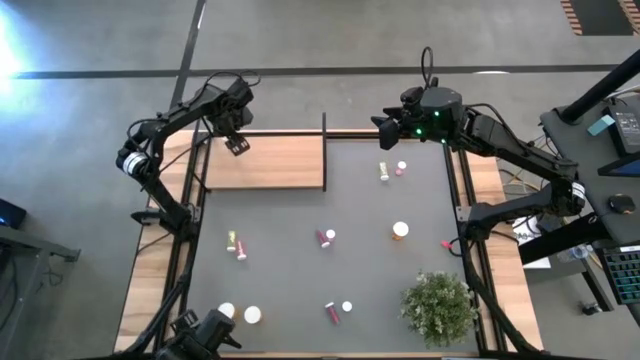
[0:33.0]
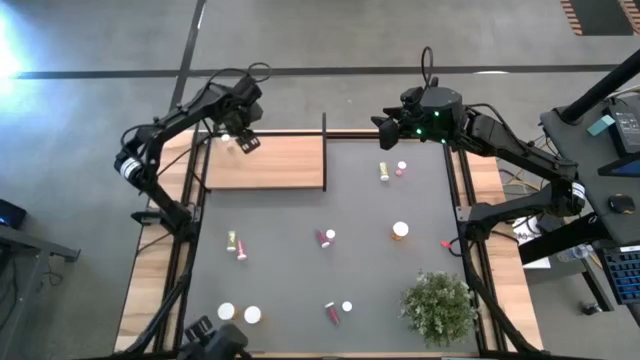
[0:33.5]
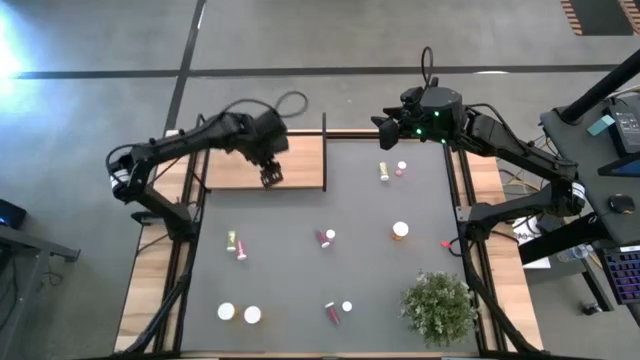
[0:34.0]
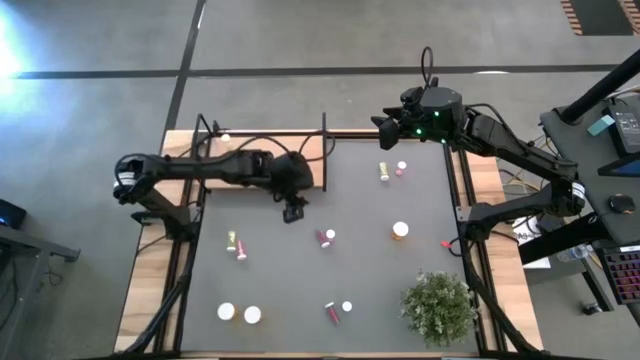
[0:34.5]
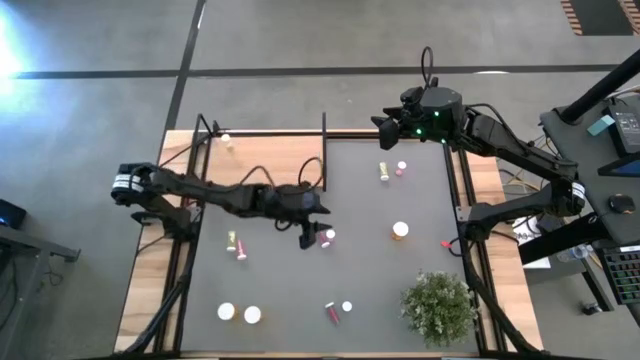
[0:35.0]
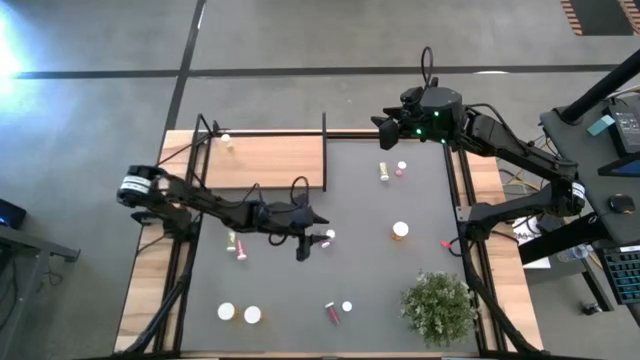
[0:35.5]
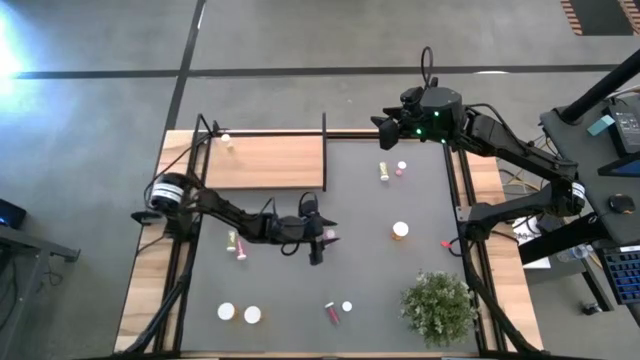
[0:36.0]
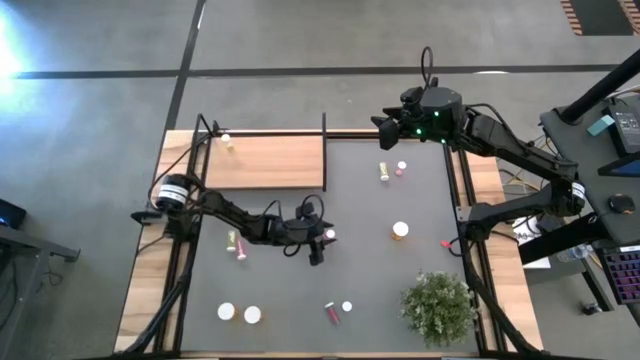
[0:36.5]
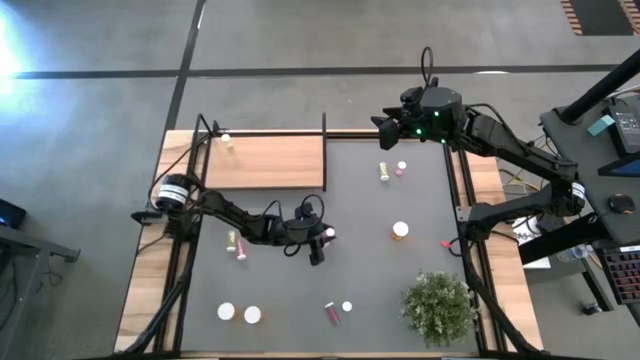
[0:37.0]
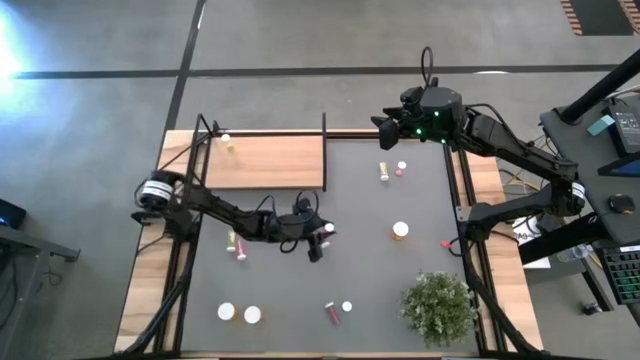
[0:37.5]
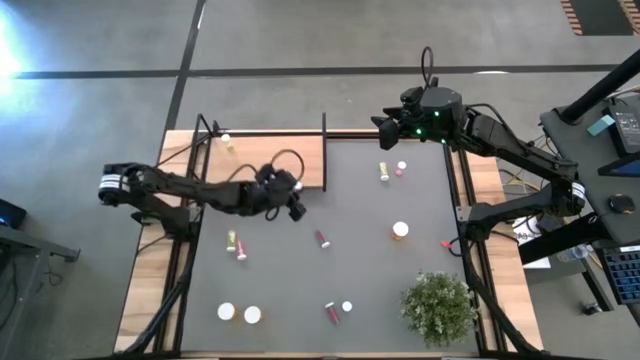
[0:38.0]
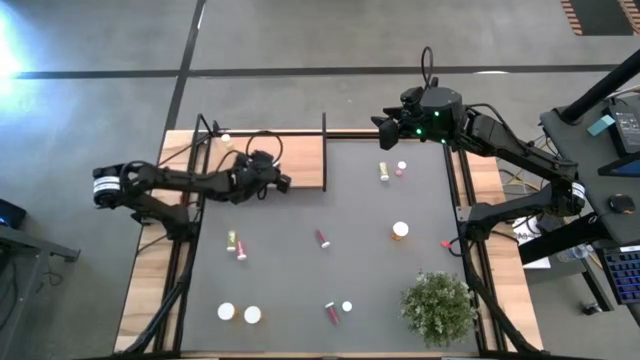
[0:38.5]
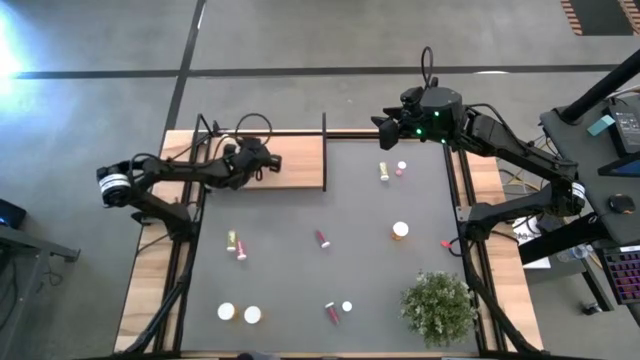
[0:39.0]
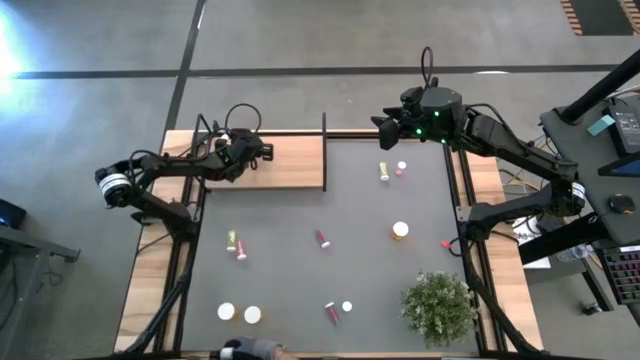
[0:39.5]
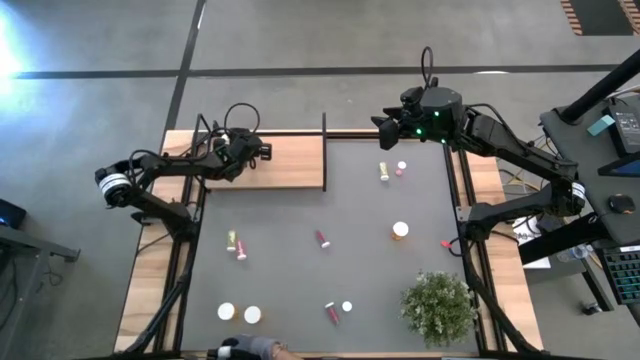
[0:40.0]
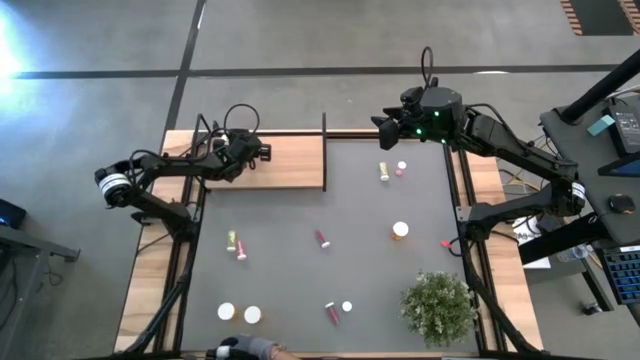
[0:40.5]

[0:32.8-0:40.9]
Task: Pick and place medicine bottles onto shelf by color
Put the middle pink pill bottle on the shelf

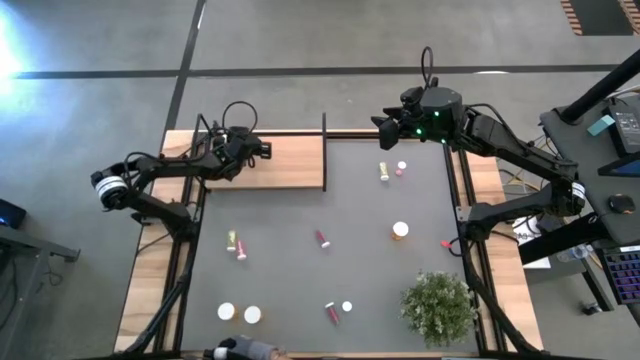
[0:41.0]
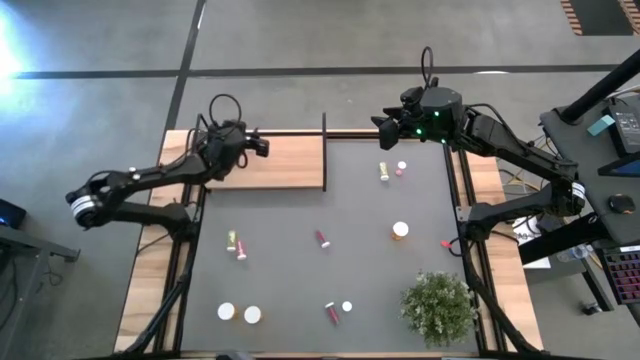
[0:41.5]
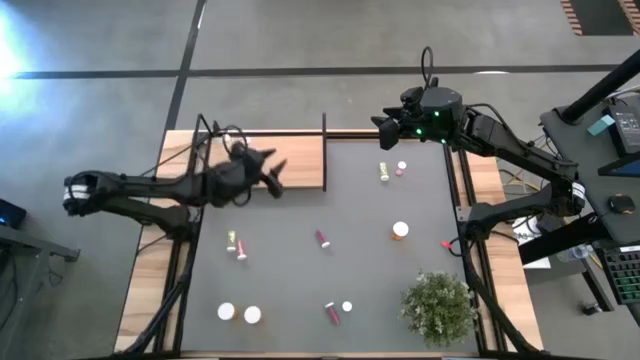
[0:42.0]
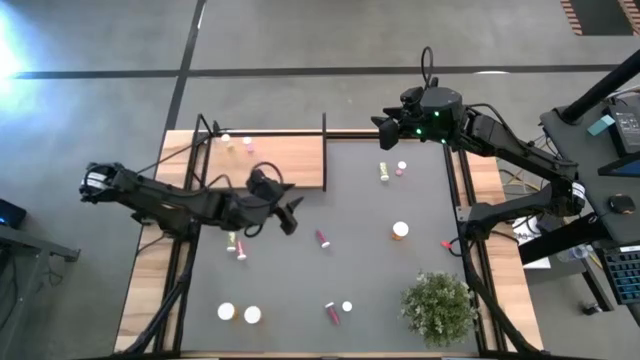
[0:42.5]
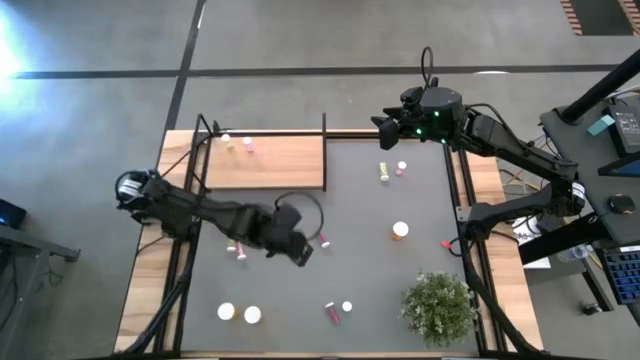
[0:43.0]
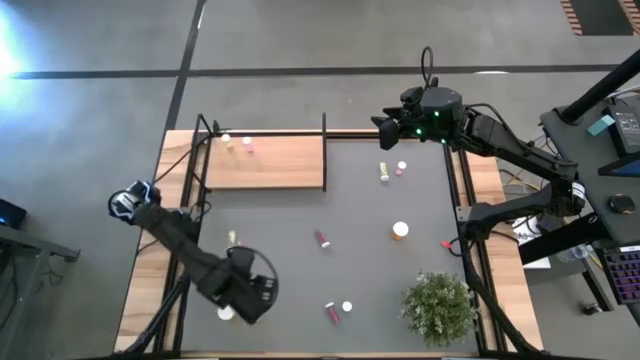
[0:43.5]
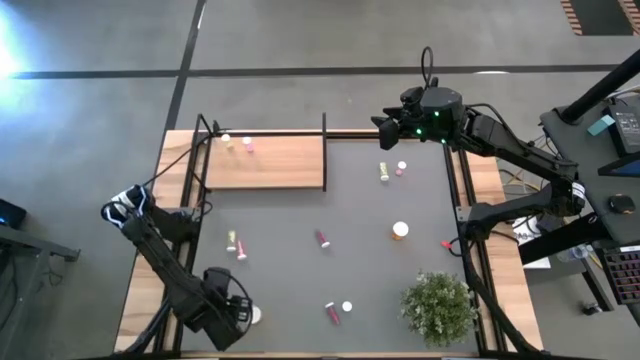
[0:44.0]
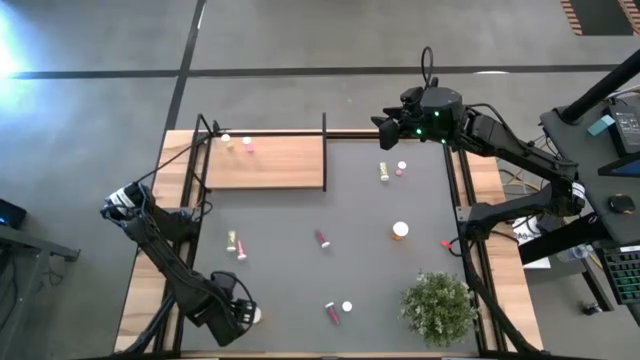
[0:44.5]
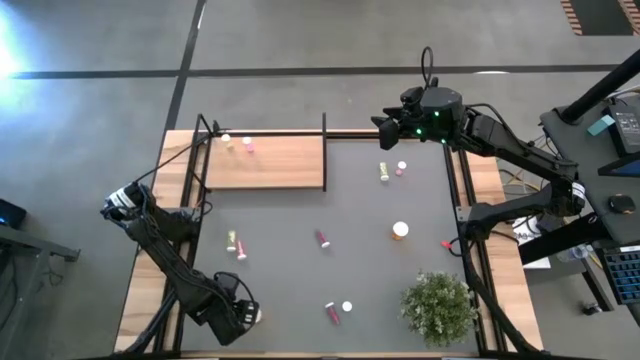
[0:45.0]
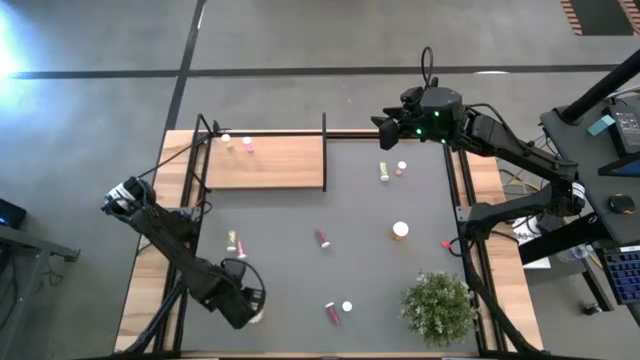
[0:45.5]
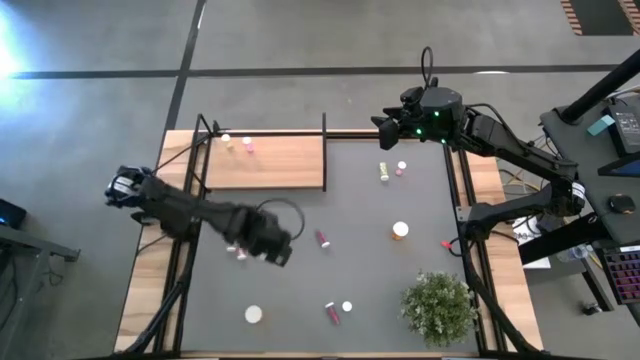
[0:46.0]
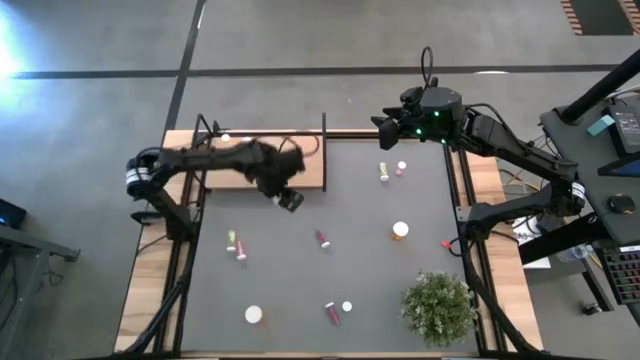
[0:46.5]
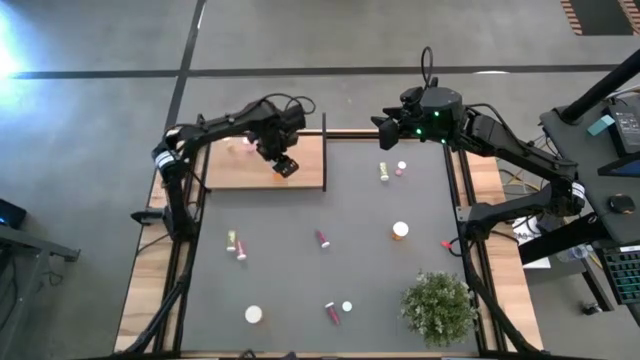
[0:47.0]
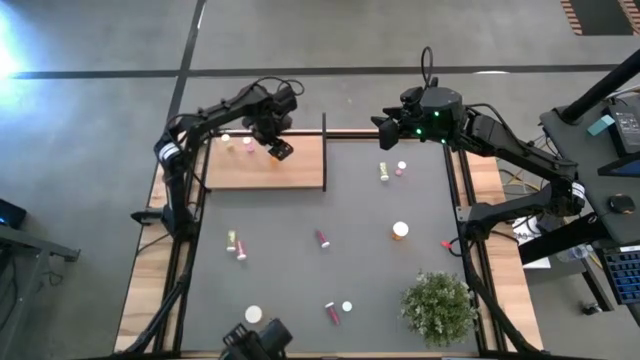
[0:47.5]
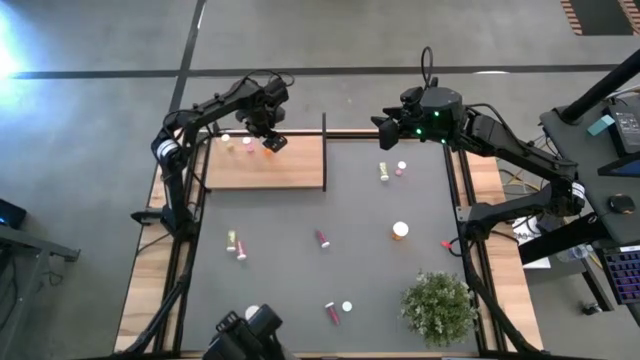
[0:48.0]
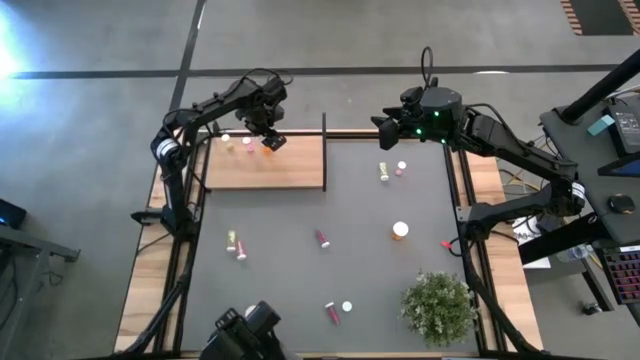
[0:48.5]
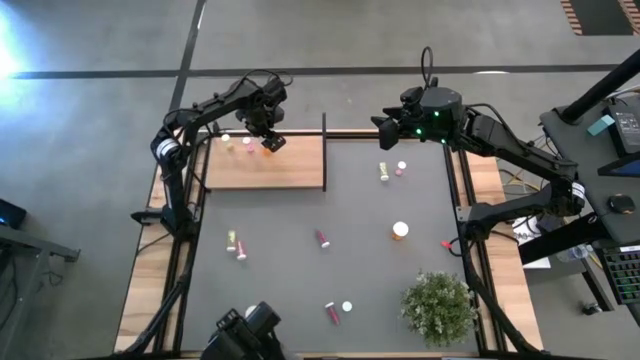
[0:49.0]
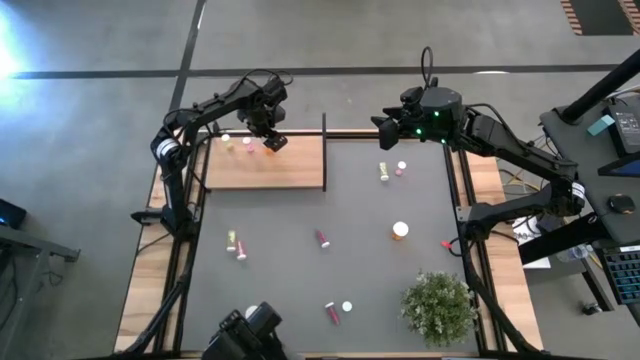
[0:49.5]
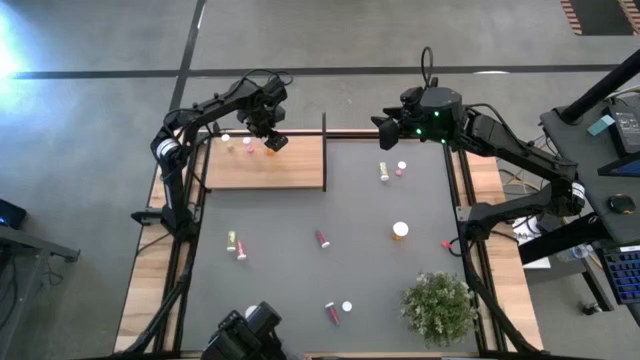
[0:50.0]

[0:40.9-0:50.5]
Put the left orange pill bottle on the shelf

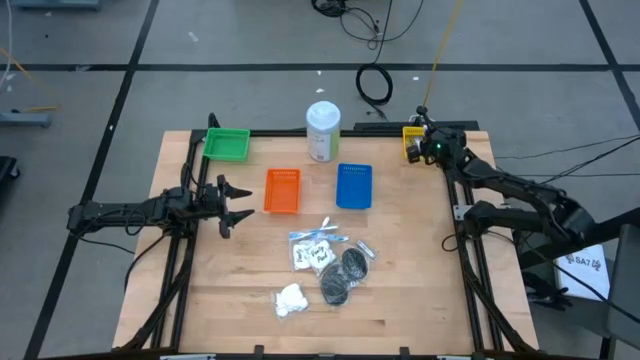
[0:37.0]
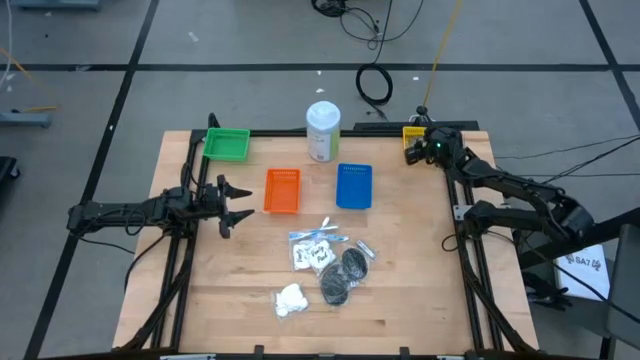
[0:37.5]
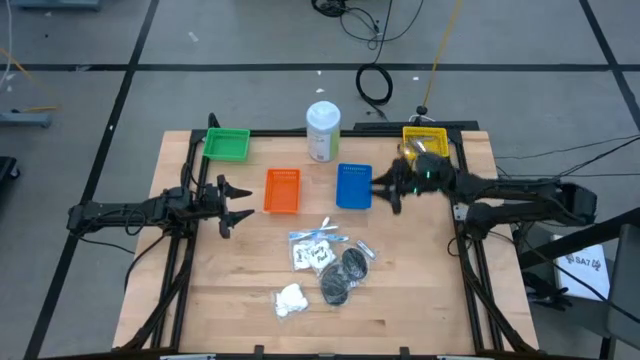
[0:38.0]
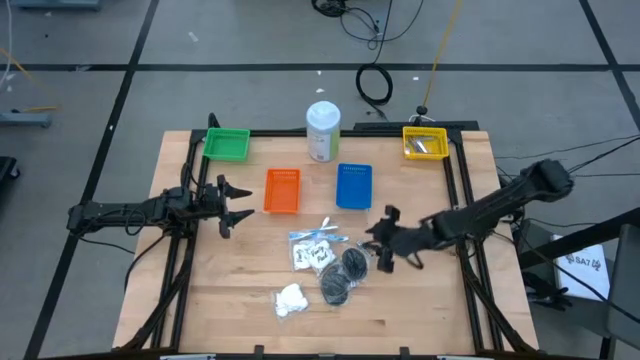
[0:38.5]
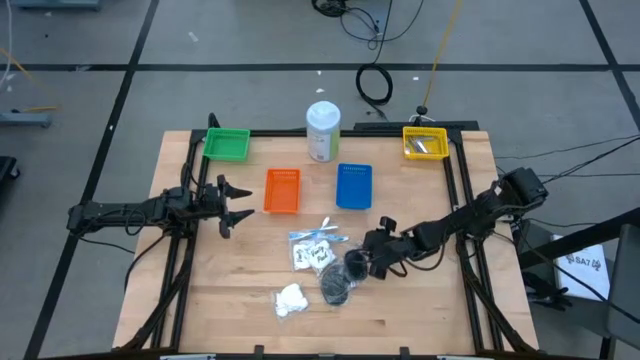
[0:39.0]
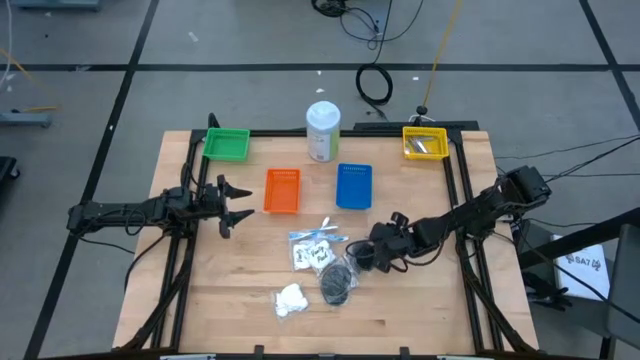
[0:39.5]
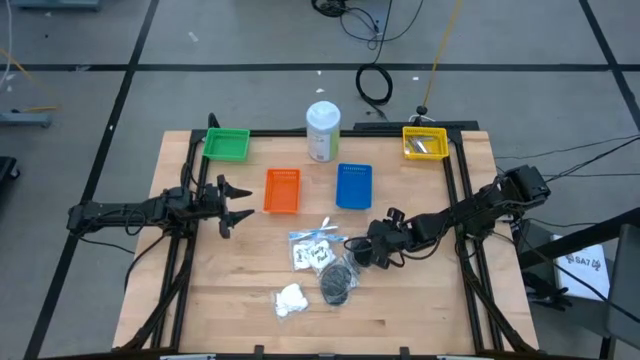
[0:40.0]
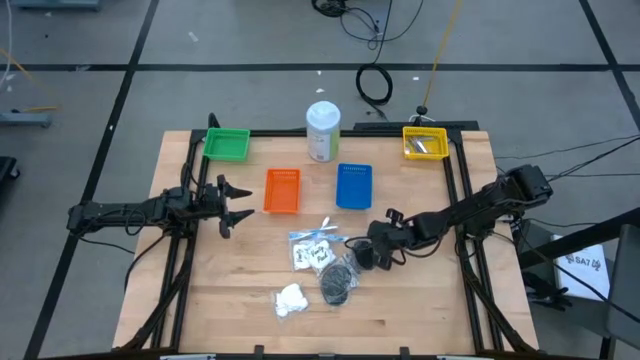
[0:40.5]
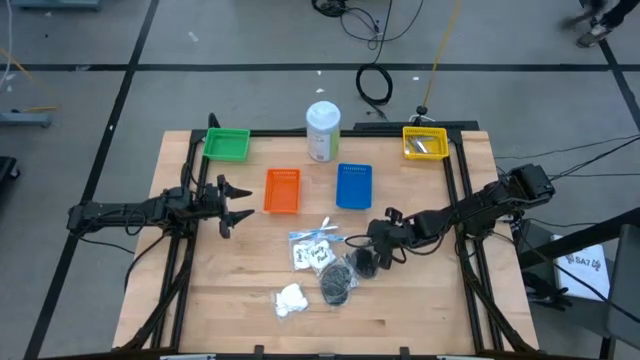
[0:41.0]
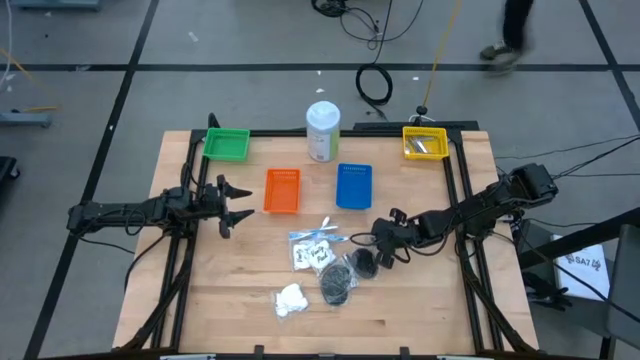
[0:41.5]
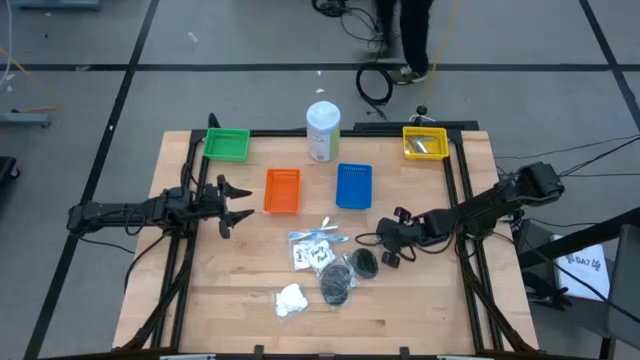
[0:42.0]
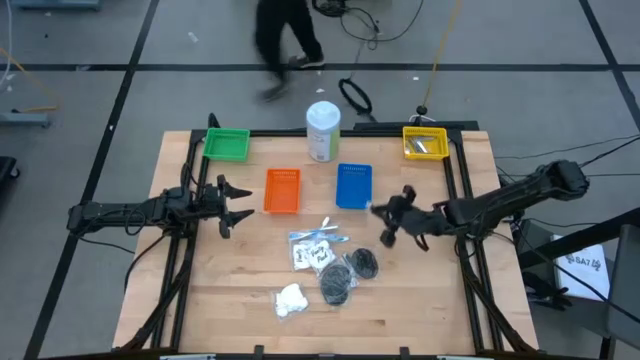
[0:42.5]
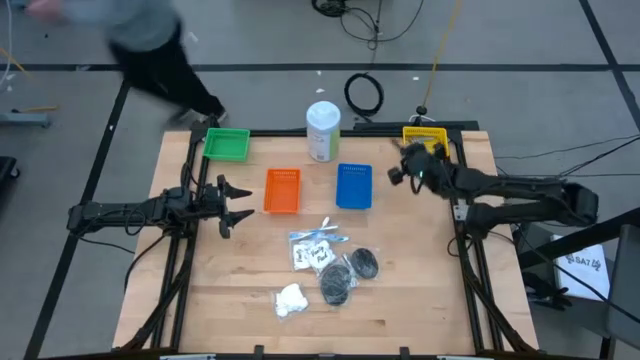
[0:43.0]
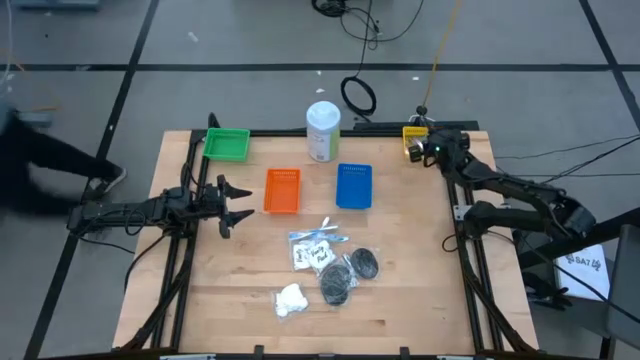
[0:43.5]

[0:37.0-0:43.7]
Task: Pick & Place Travel size toiletries
Put the nail cutter into the yellow bin
